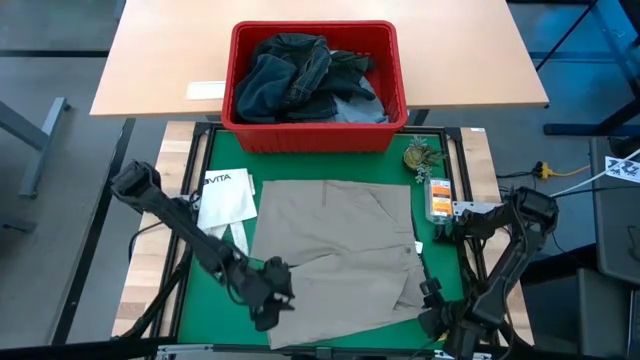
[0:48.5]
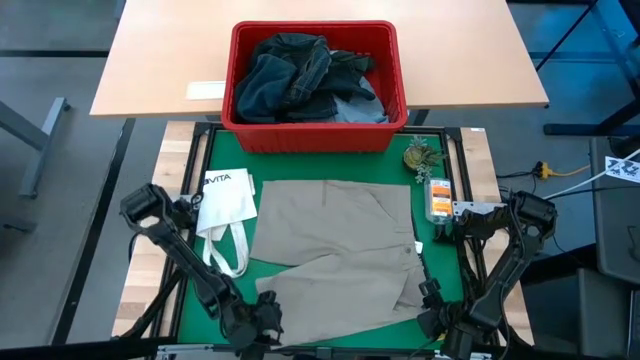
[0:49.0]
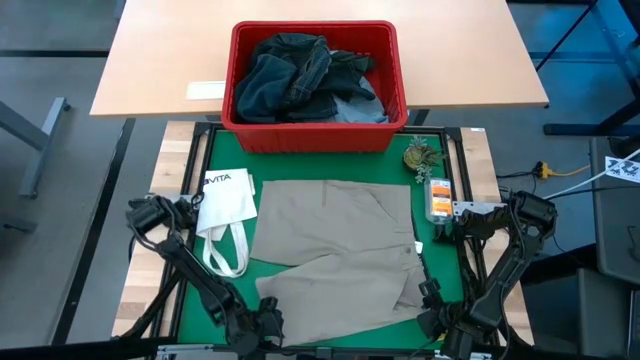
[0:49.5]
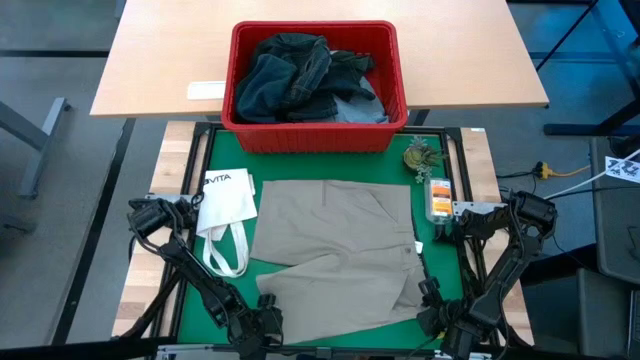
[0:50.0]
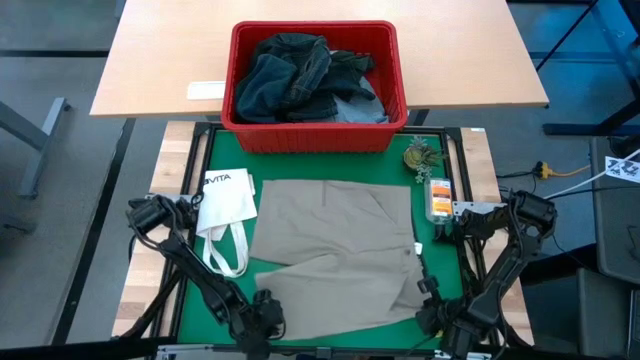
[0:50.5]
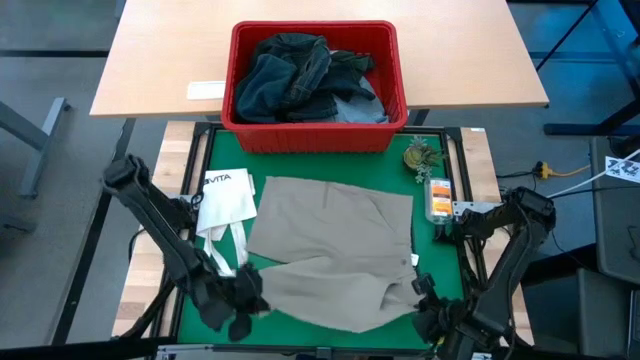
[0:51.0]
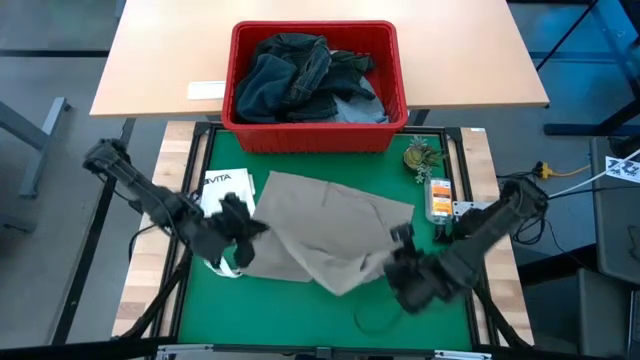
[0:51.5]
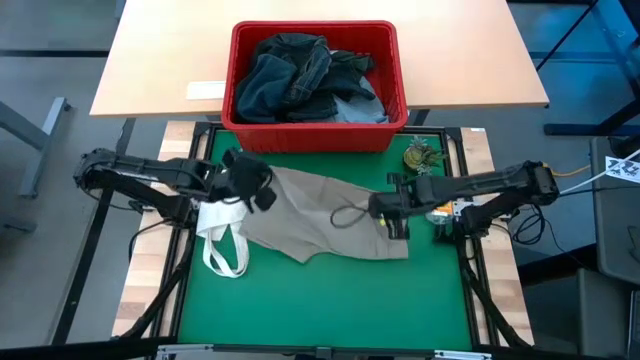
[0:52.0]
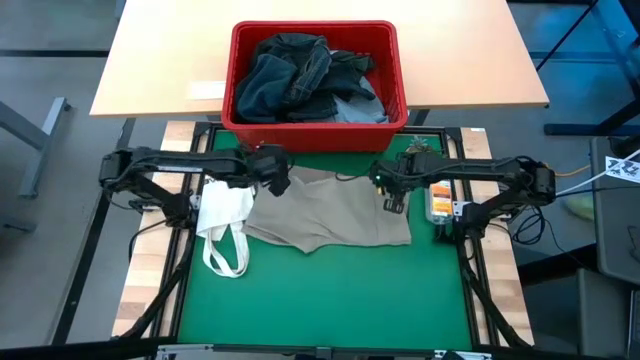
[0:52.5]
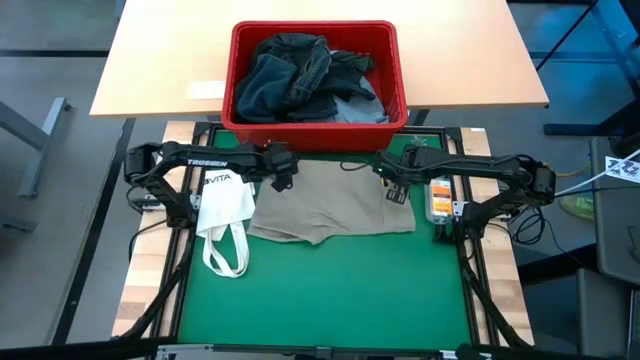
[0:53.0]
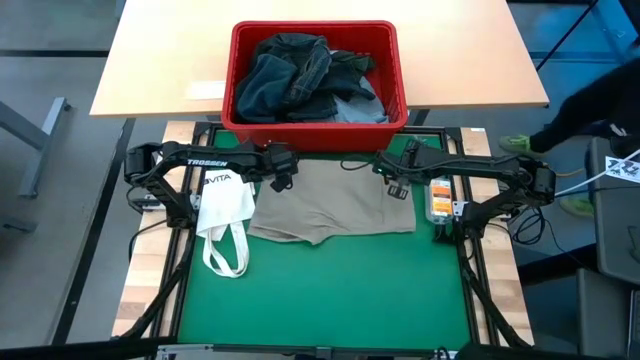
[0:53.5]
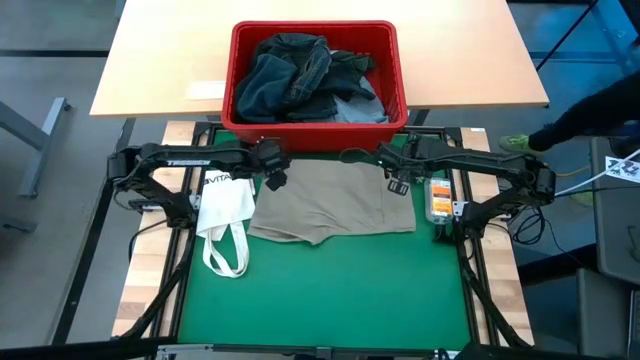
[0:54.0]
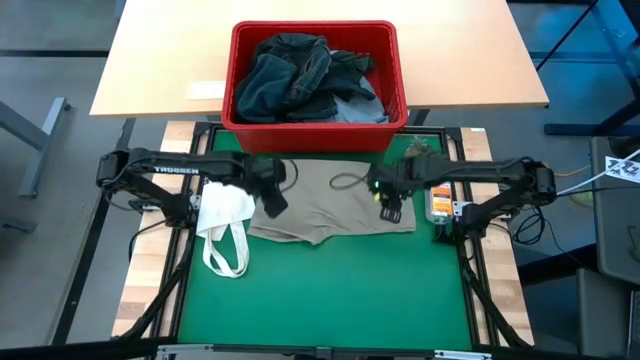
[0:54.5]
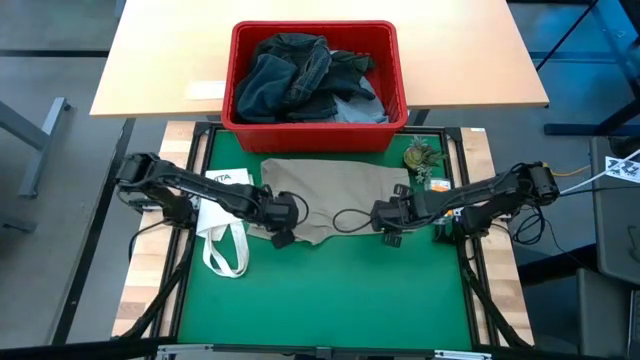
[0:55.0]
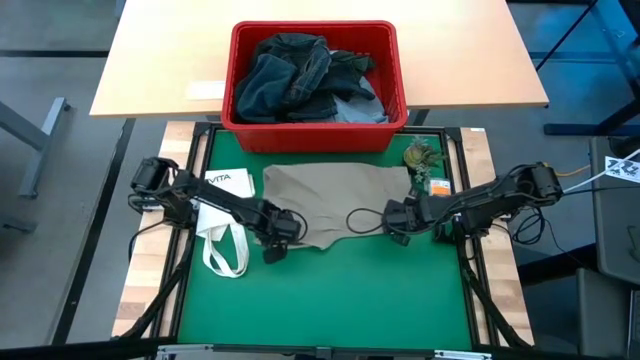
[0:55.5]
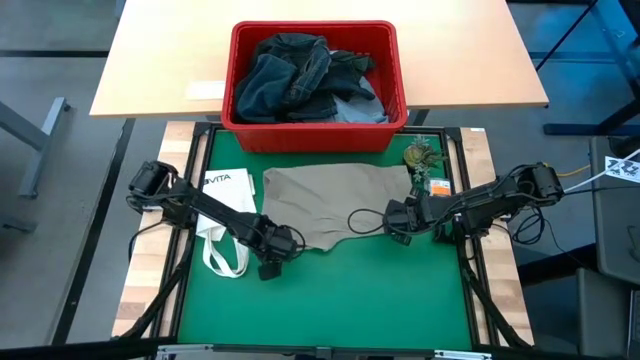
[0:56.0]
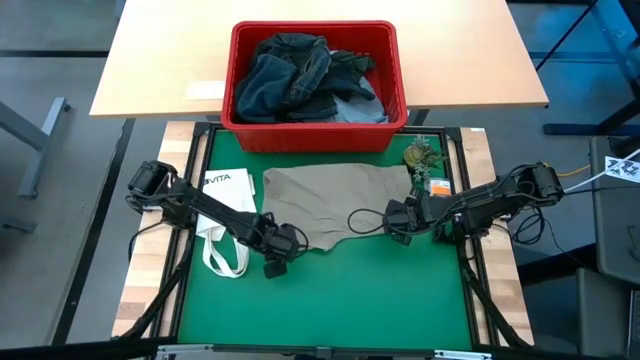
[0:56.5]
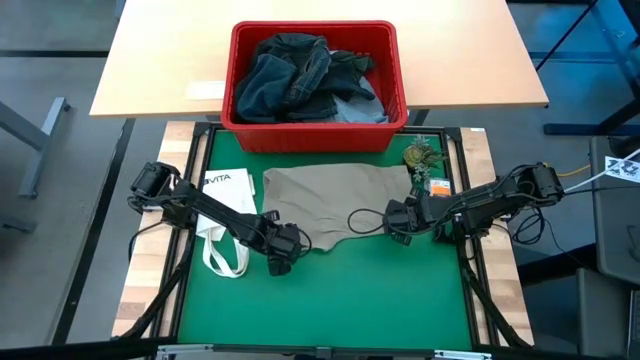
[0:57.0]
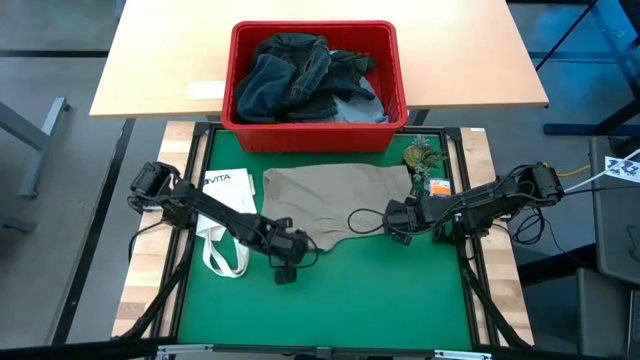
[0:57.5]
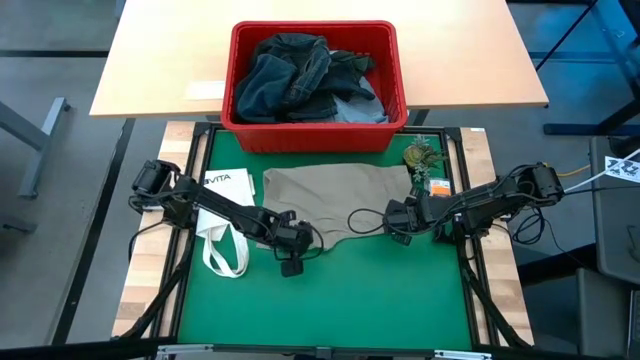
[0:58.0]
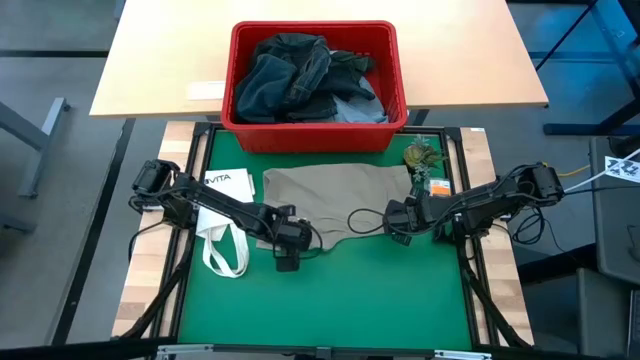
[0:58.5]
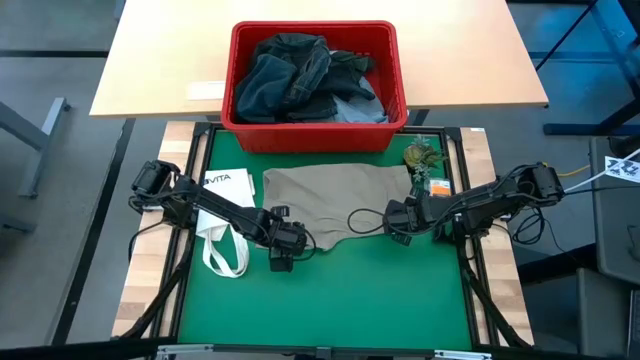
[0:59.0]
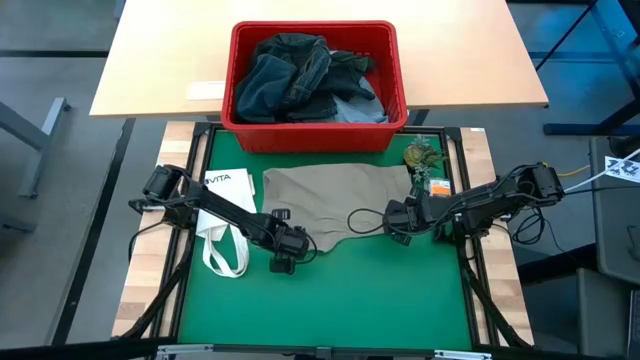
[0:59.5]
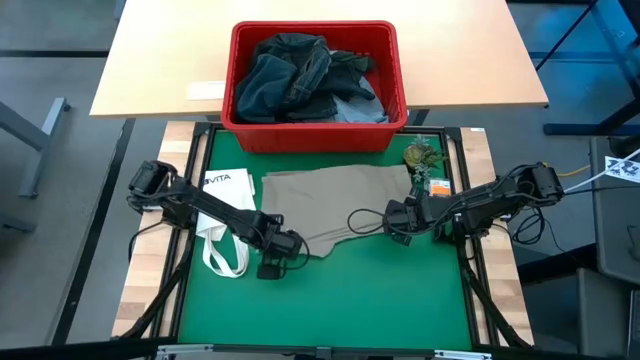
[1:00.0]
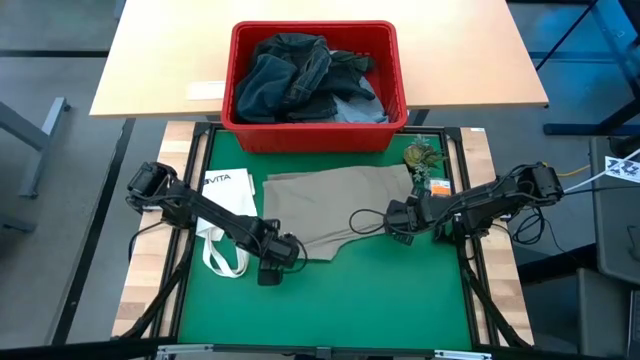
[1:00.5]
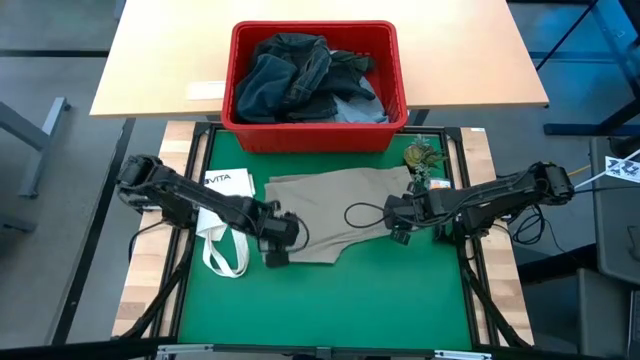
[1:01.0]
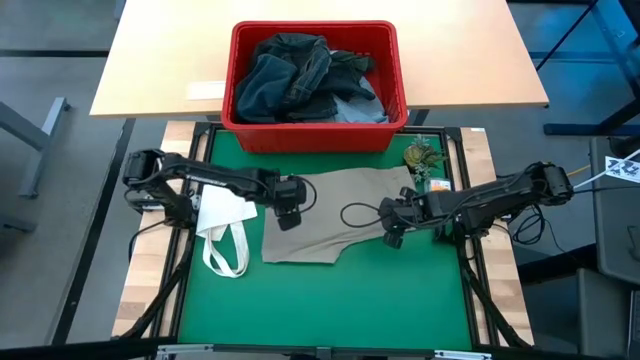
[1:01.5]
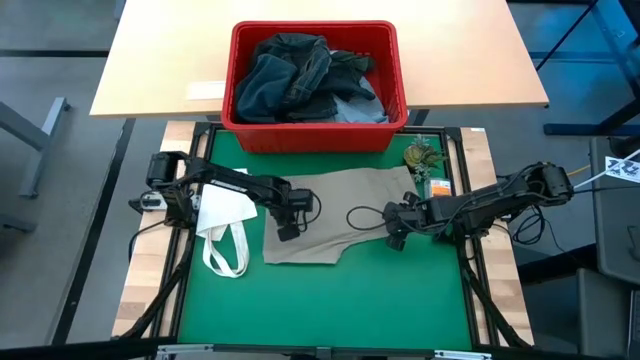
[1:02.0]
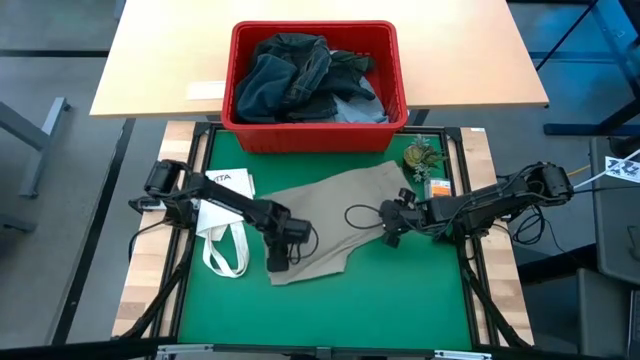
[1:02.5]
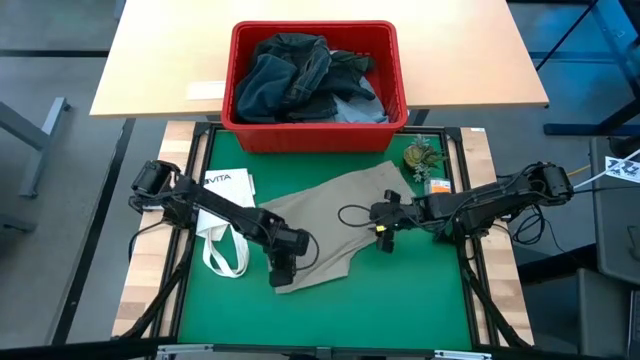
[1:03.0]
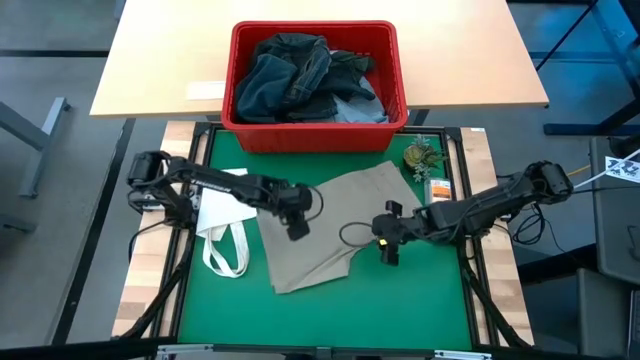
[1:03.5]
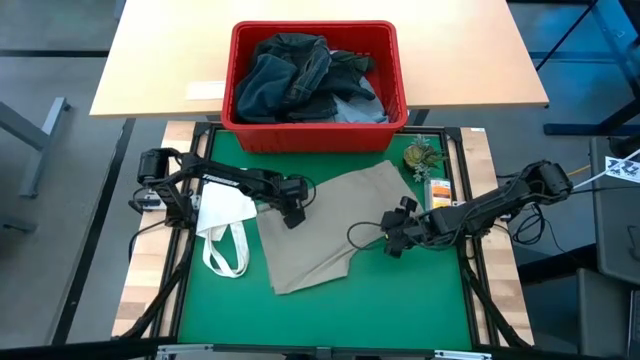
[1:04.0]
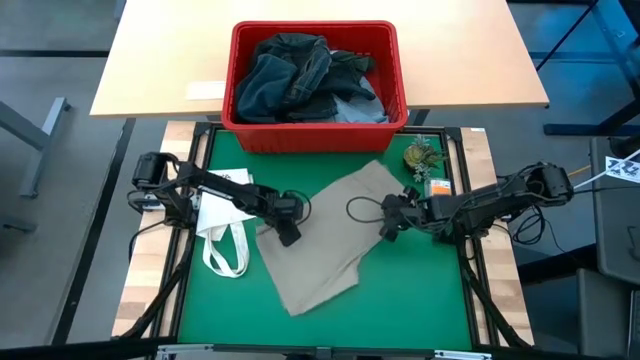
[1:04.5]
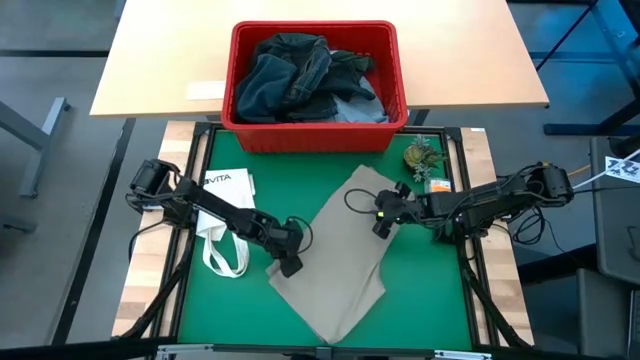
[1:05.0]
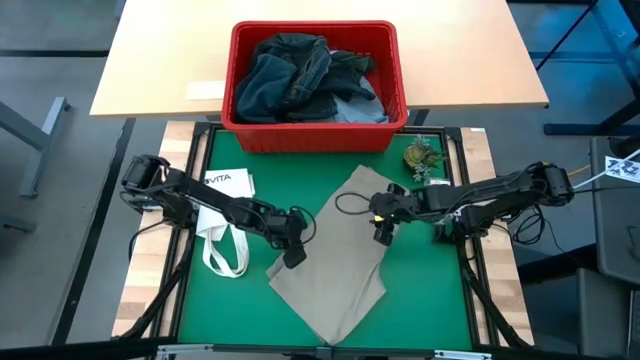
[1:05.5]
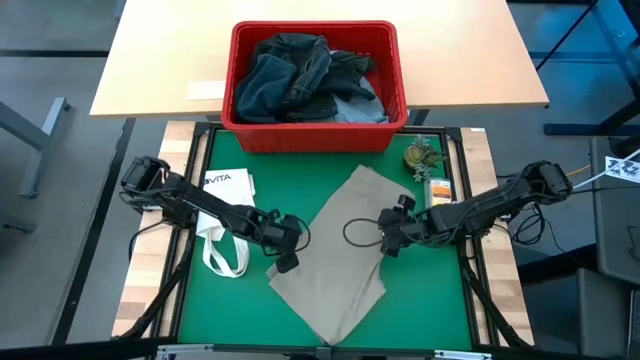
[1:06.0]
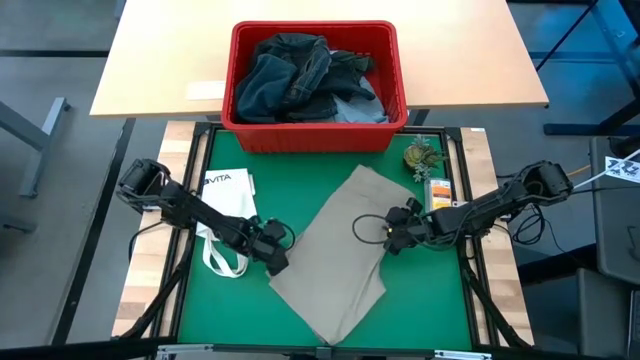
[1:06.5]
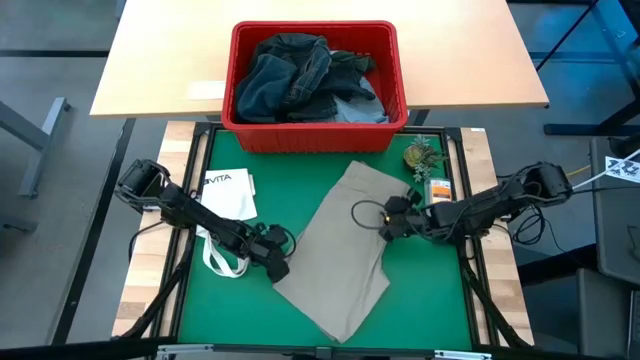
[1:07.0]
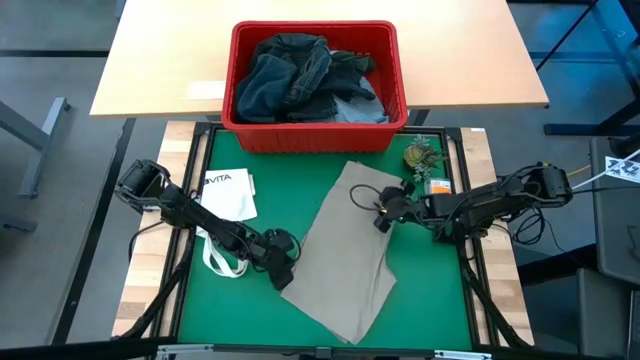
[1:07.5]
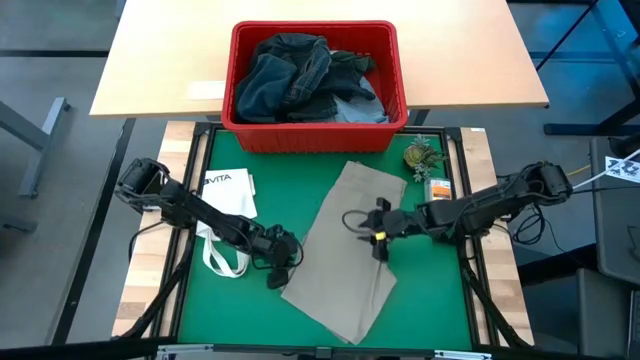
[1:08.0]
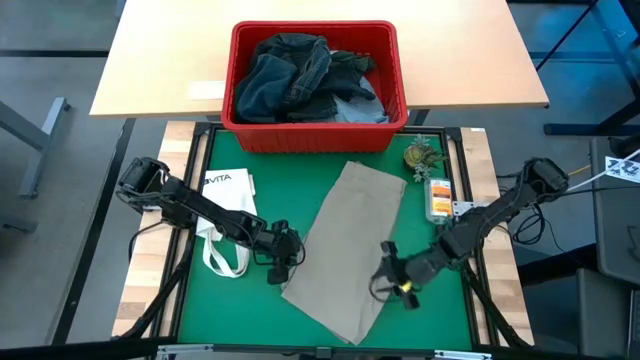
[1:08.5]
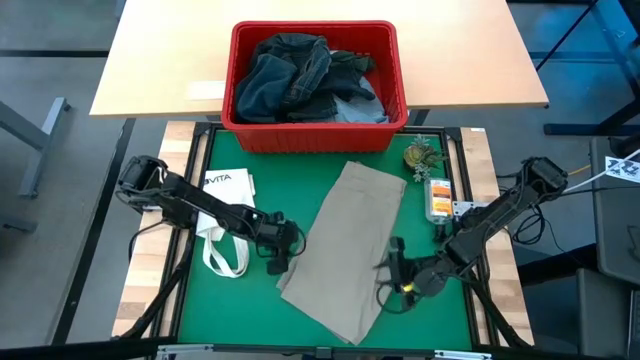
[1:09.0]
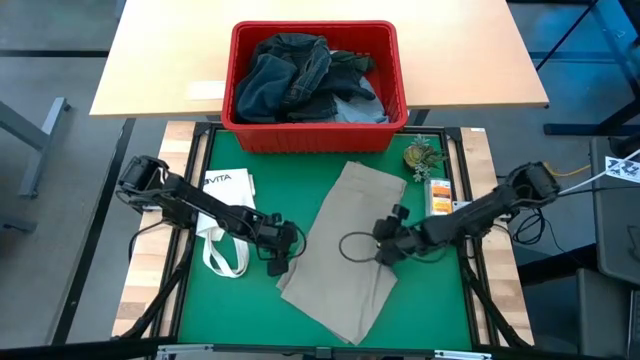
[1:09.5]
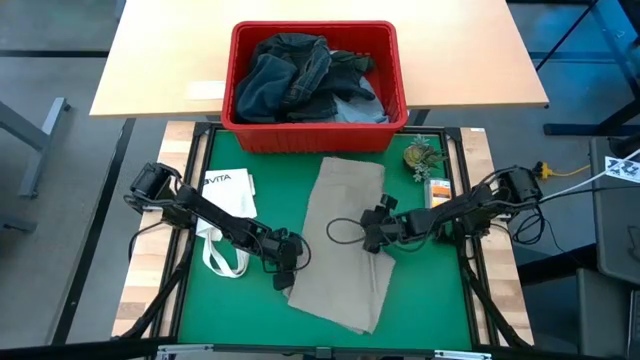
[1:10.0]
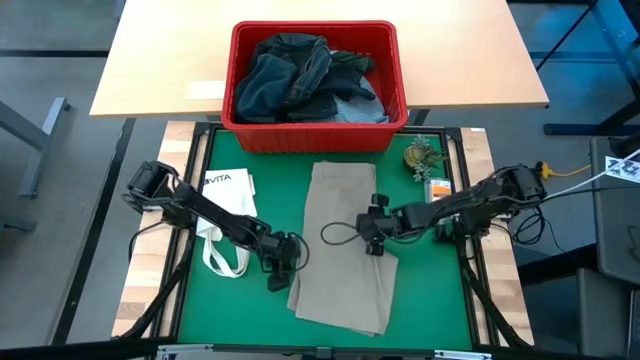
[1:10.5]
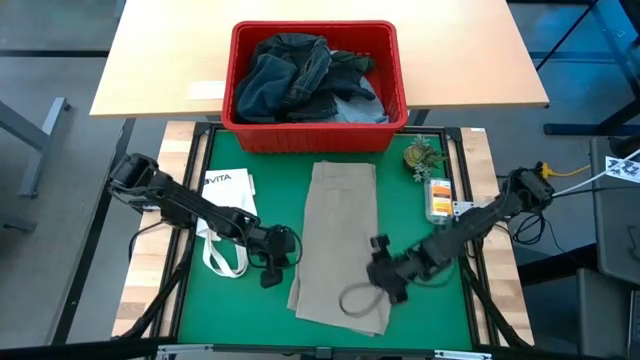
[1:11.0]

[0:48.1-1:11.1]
Task: Fold Laundry from Bin
Fold the gray shorts
